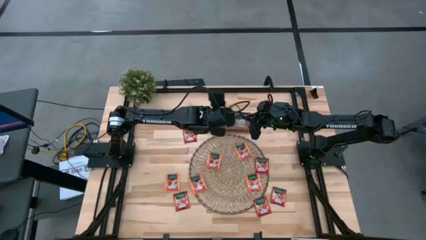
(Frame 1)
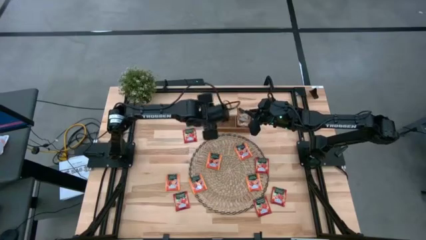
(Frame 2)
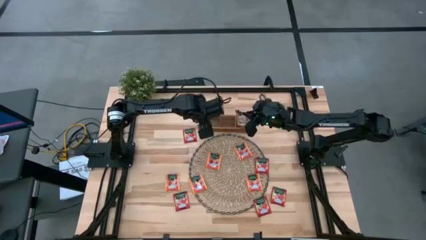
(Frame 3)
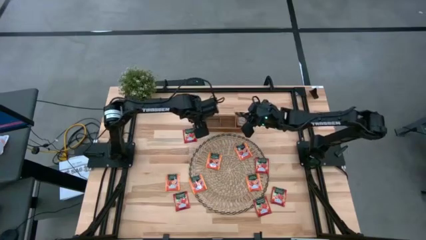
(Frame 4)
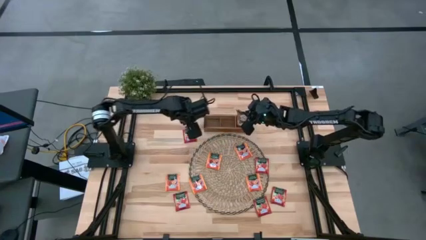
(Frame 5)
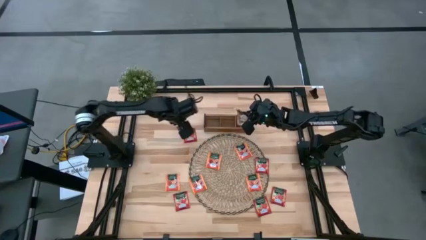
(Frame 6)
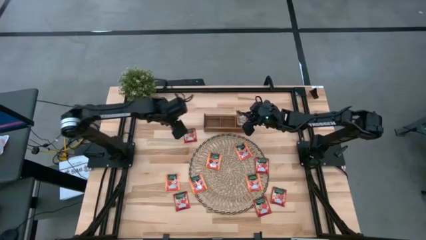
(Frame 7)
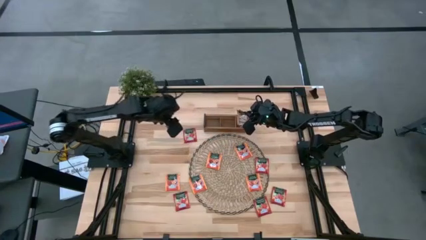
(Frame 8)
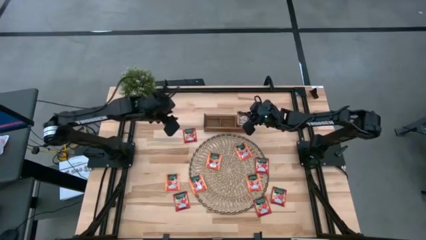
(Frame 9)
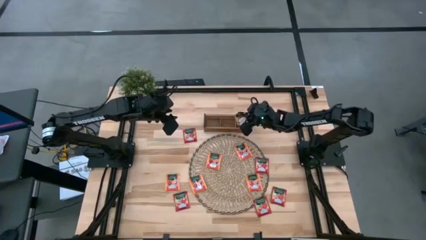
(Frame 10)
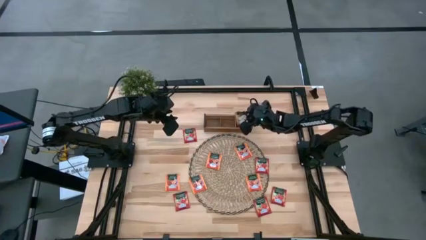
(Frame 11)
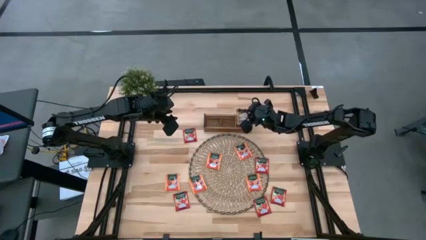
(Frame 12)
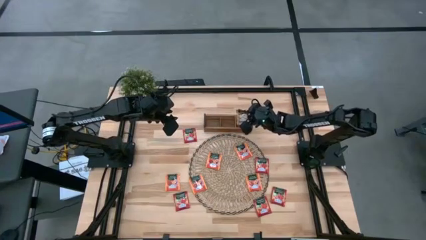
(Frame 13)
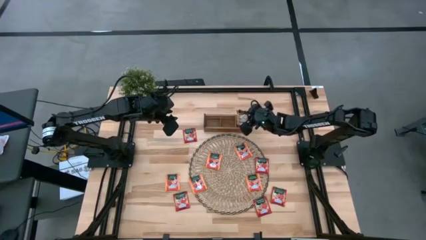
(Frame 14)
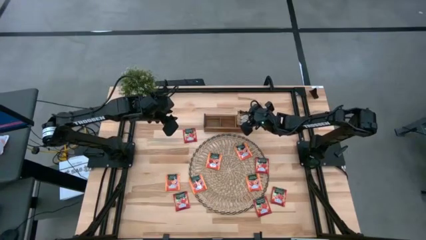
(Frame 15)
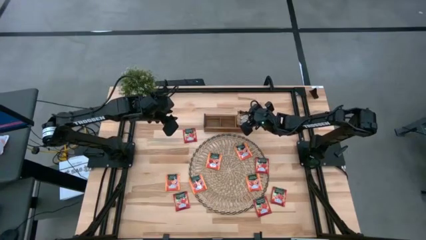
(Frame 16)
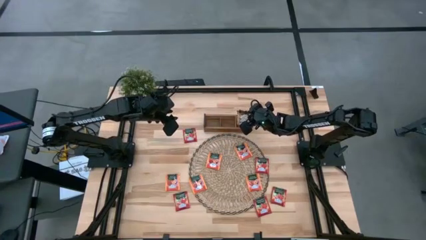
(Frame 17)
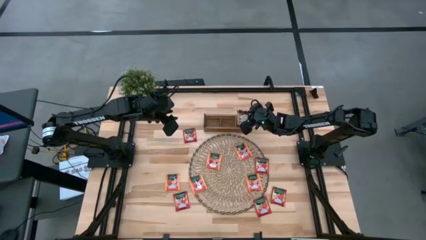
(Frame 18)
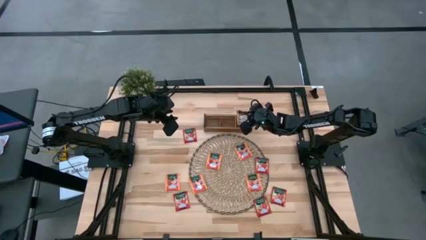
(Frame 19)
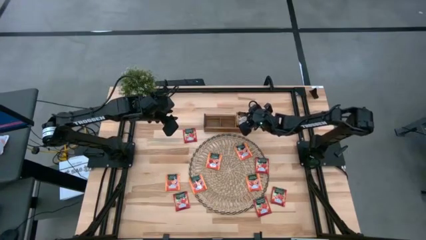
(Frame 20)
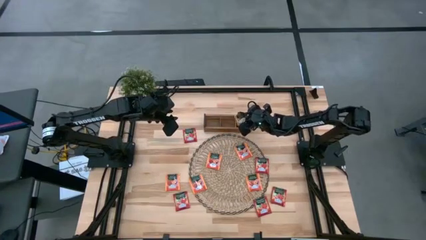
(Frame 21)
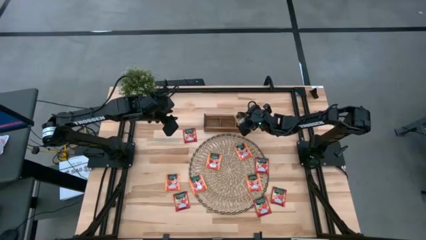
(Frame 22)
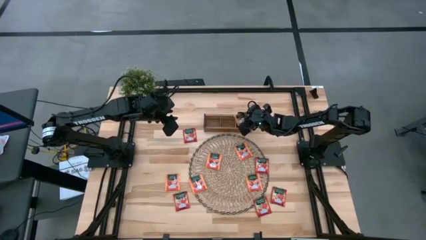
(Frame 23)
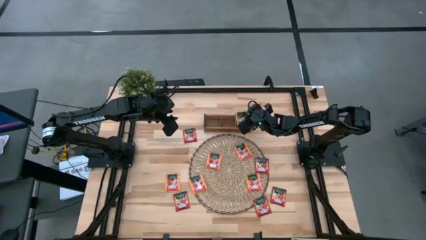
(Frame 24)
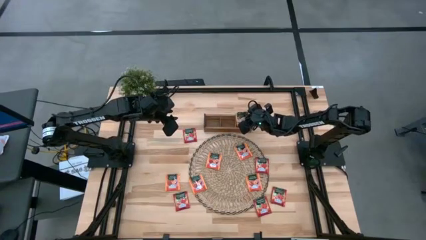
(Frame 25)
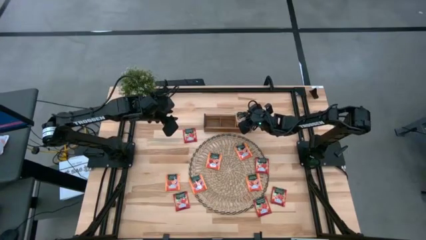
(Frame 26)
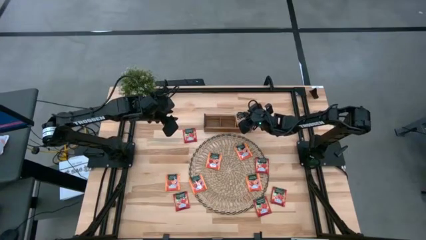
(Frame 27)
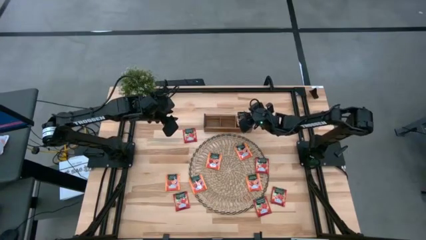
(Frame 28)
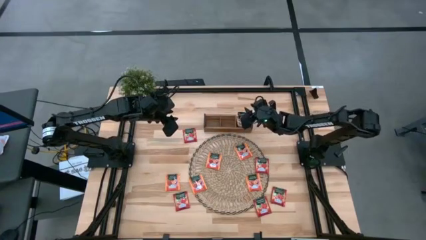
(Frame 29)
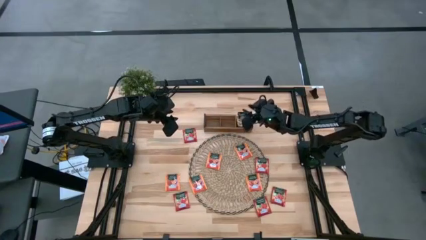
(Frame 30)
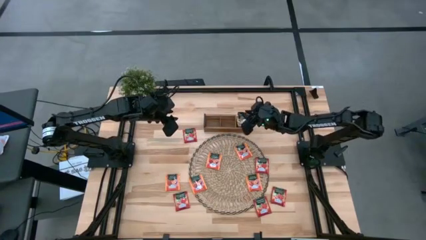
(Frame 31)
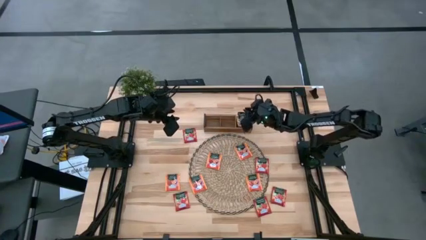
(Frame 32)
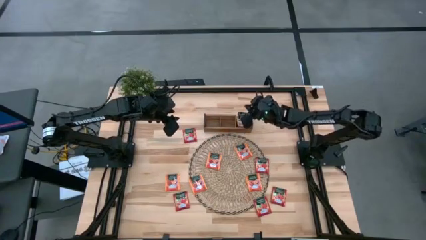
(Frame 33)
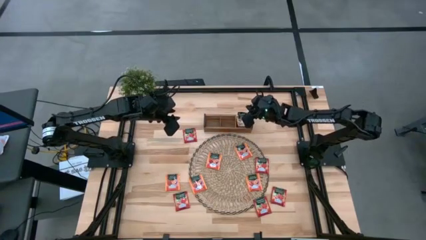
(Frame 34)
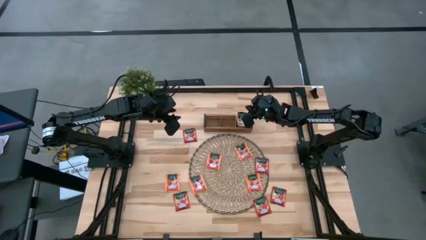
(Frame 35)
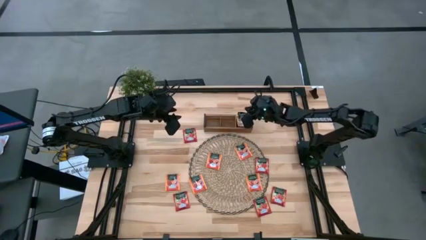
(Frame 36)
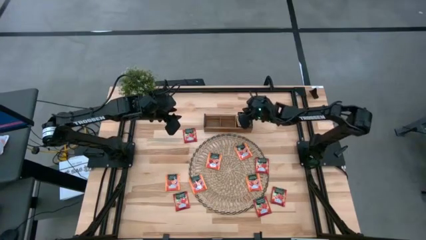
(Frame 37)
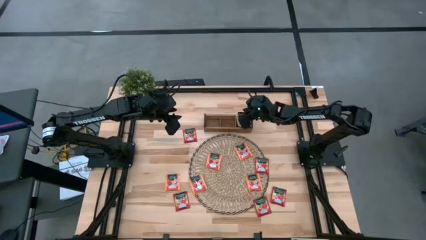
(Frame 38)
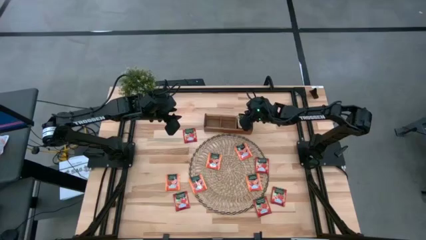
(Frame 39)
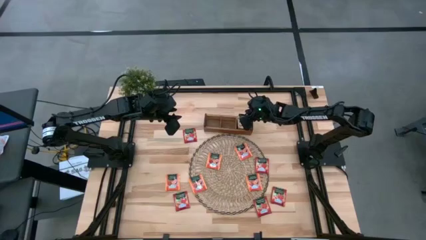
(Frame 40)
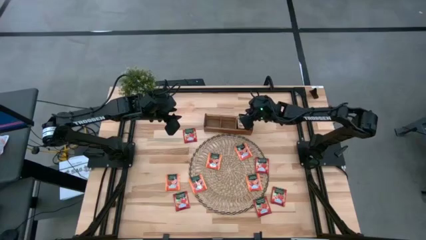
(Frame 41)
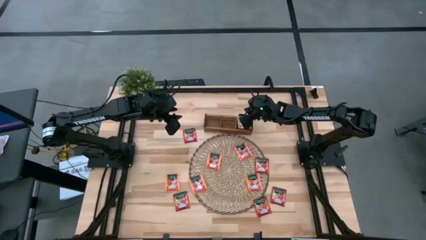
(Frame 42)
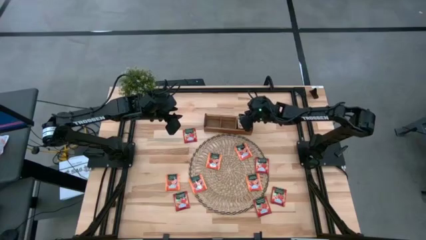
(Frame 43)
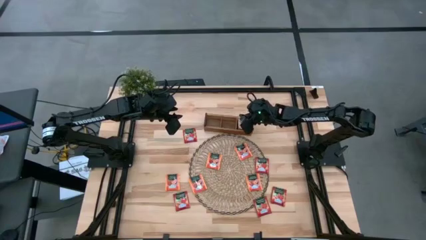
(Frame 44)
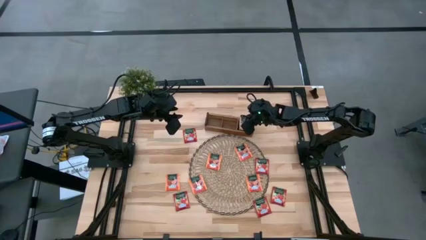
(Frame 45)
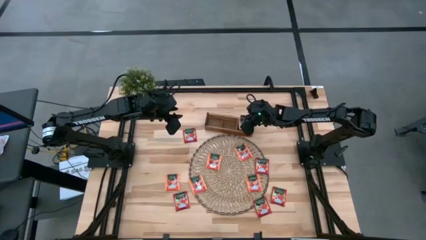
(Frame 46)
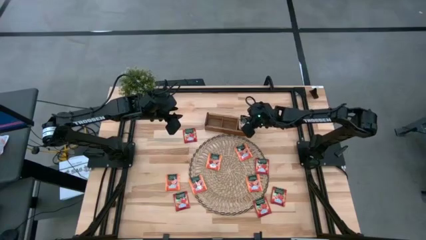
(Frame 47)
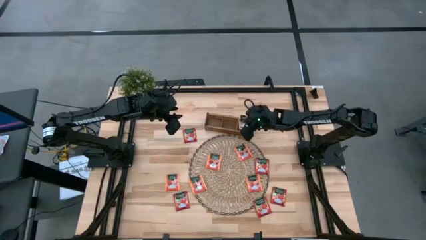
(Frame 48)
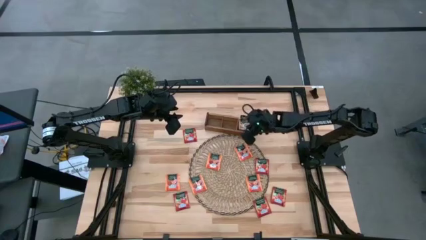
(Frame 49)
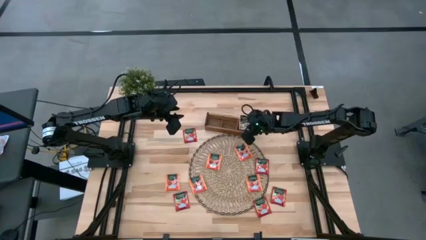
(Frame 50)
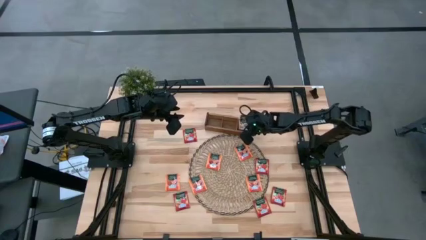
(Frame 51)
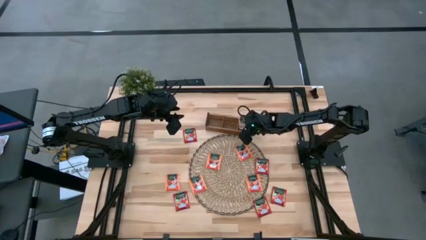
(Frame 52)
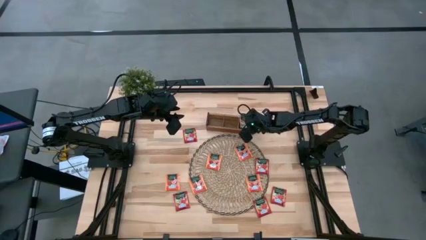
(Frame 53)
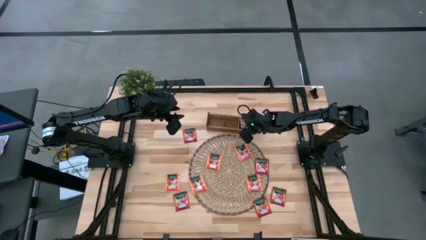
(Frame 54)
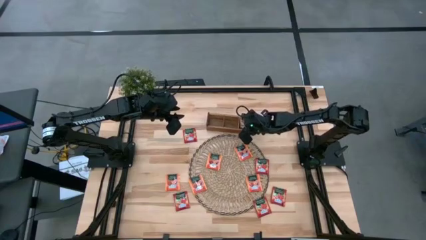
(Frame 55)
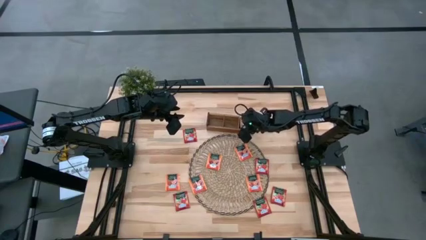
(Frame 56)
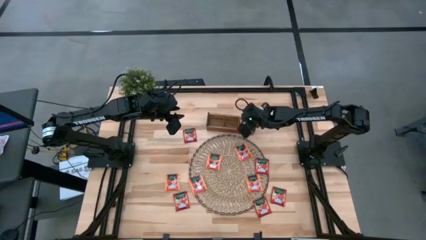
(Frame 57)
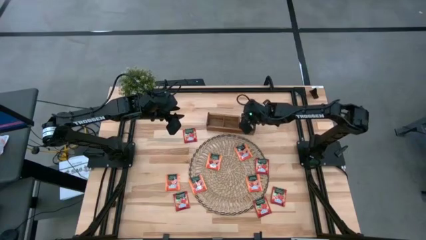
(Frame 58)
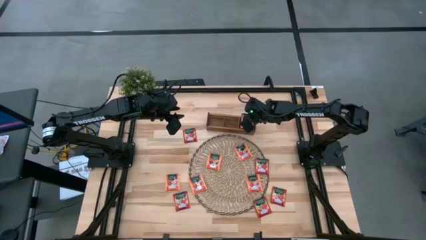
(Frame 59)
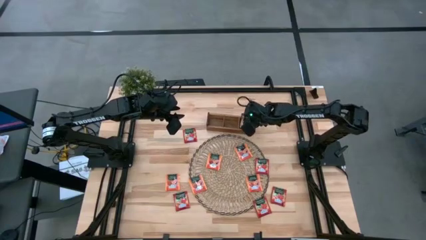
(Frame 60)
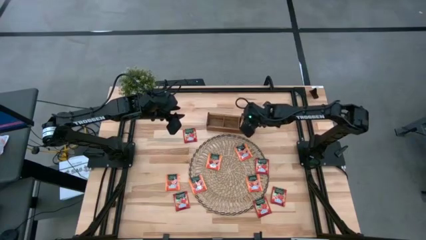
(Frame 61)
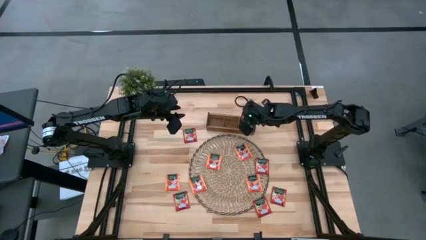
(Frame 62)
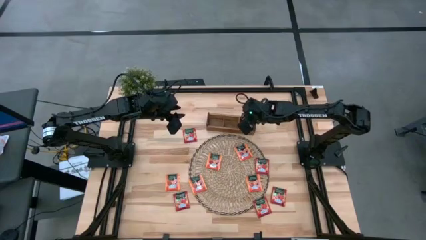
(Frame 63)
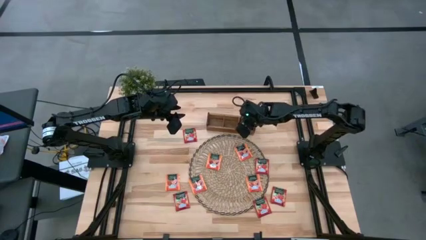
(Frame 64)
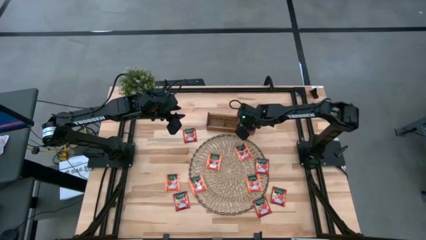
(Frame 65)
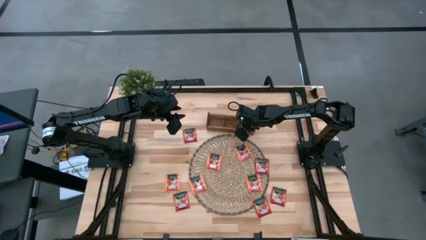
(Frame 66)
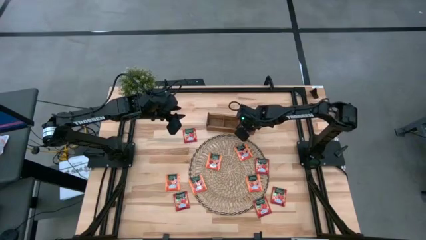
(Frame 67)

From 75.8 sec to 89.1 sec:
Task: Pick & Place Tea
Put the brown tea bag into the right section of the wooden organizer

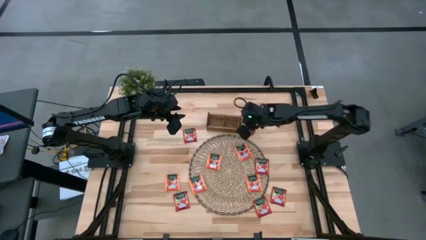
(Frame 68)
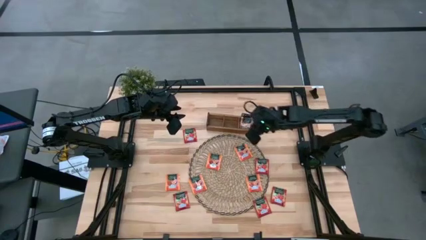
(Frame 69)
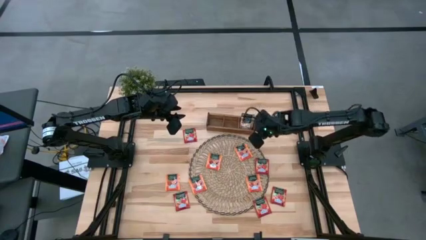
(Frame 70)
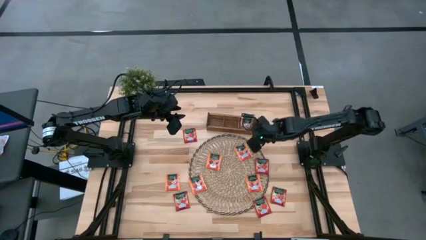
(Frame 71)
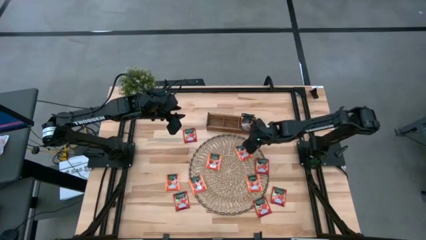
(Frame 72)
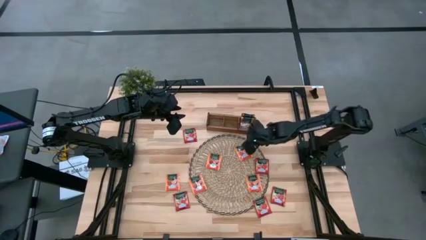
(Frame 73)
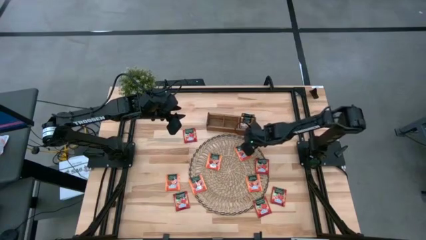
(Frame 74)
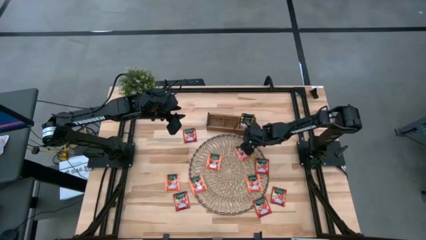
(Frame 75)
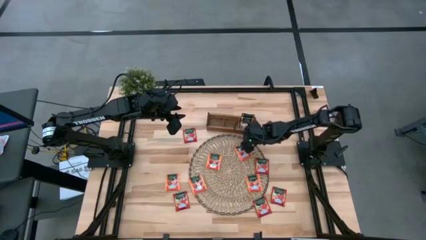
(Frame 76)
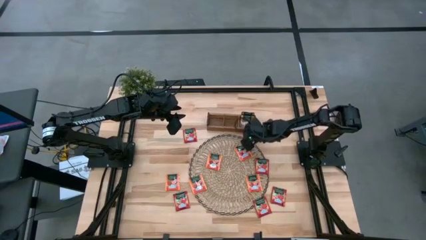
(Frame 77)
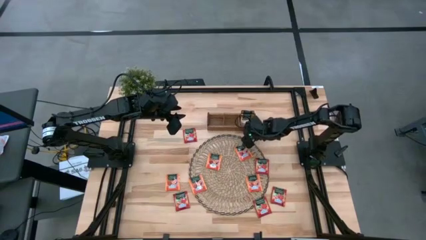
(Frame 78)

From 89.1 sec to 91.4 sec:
Adjust the wooden organizer
